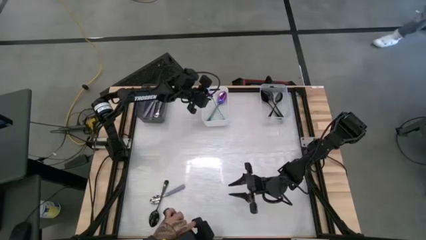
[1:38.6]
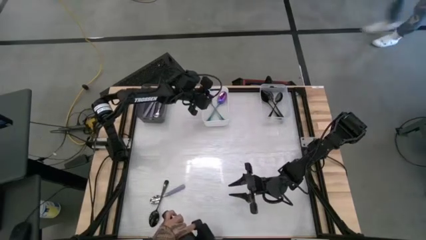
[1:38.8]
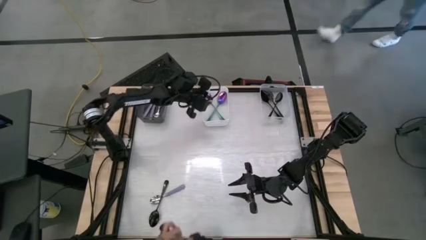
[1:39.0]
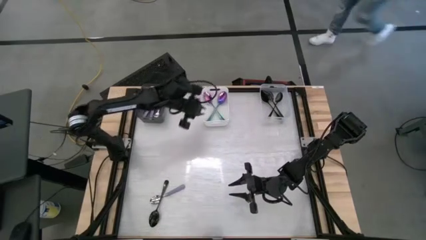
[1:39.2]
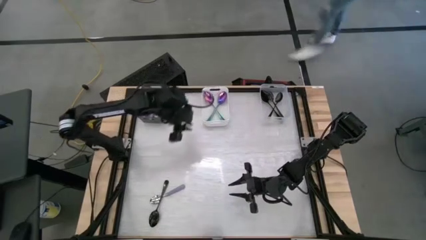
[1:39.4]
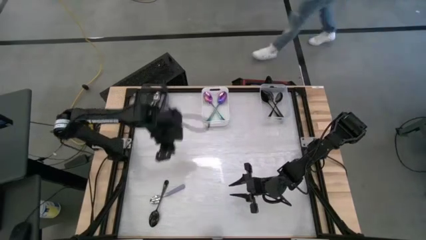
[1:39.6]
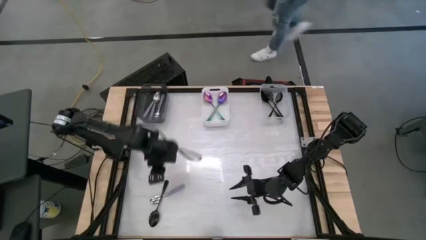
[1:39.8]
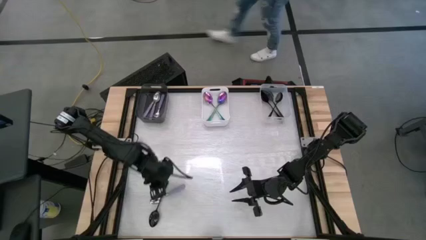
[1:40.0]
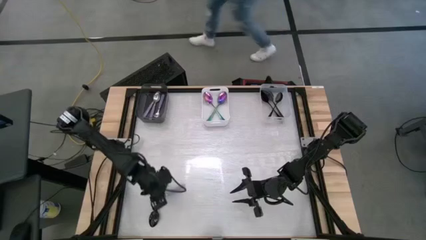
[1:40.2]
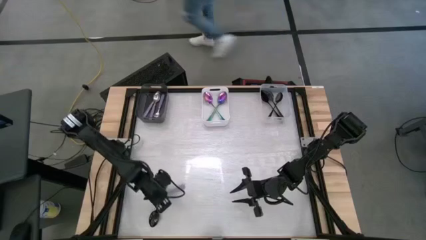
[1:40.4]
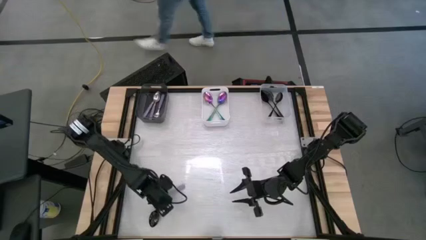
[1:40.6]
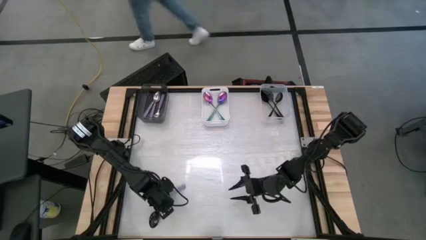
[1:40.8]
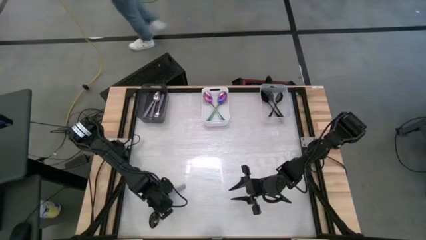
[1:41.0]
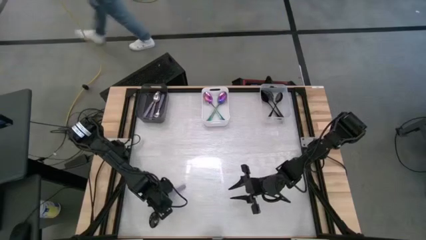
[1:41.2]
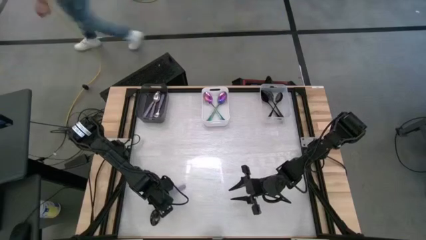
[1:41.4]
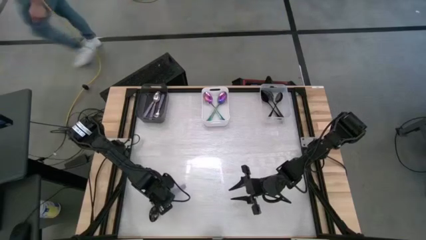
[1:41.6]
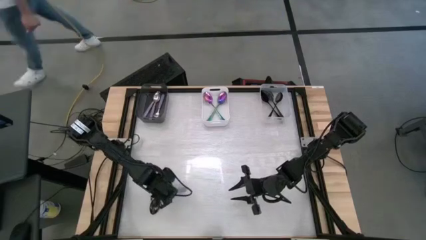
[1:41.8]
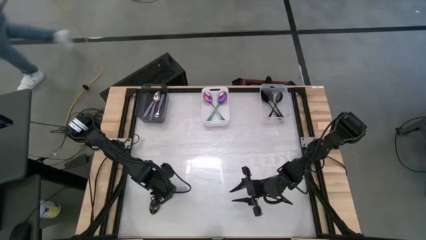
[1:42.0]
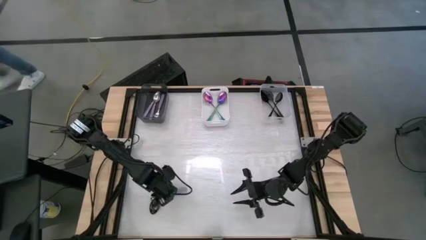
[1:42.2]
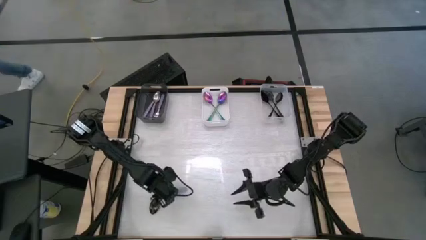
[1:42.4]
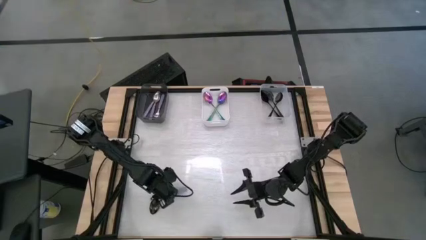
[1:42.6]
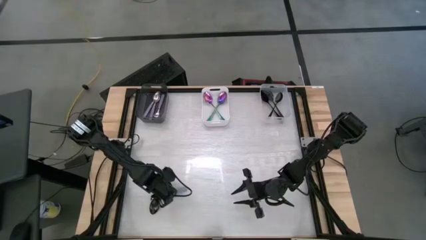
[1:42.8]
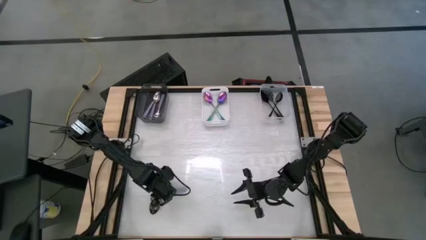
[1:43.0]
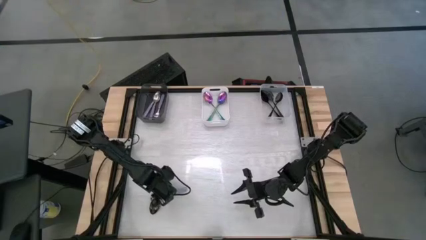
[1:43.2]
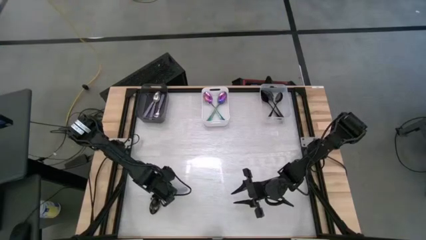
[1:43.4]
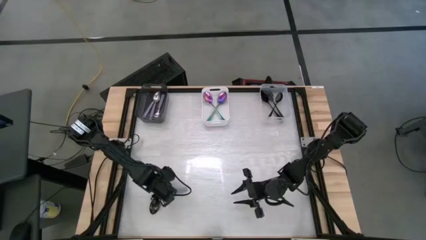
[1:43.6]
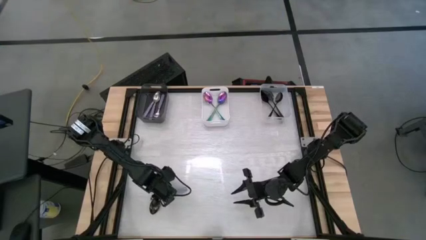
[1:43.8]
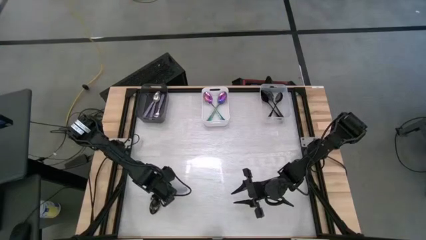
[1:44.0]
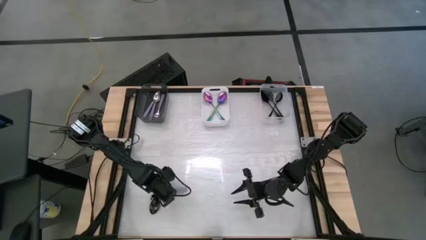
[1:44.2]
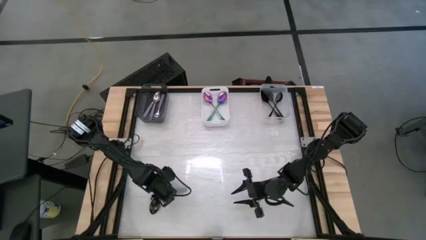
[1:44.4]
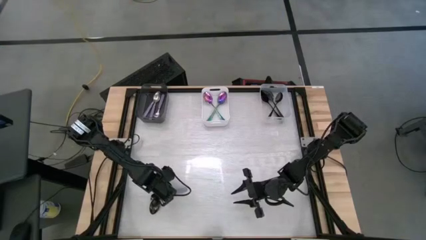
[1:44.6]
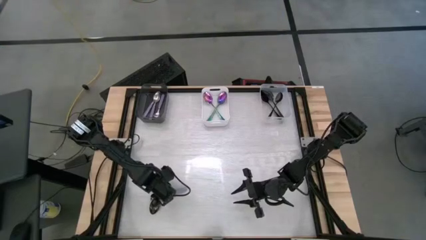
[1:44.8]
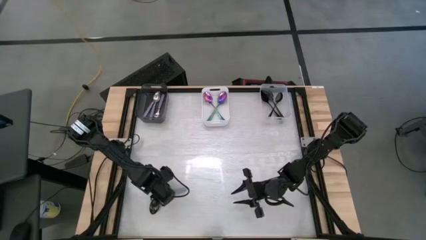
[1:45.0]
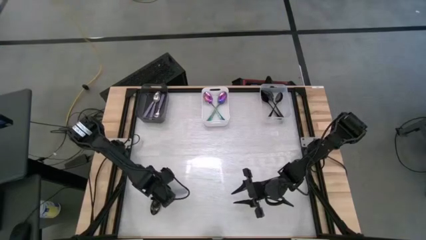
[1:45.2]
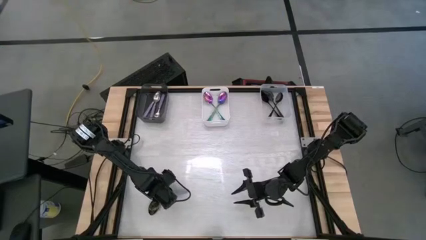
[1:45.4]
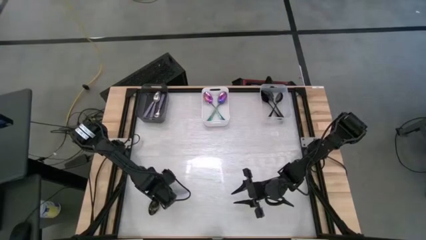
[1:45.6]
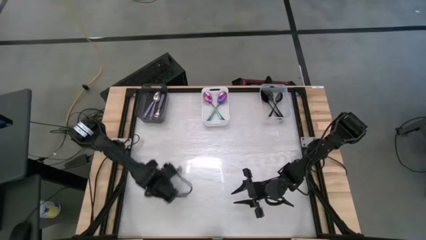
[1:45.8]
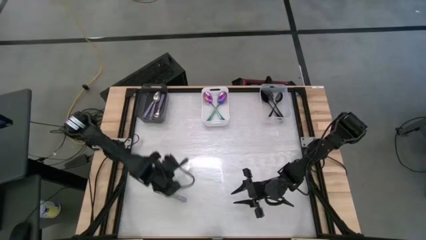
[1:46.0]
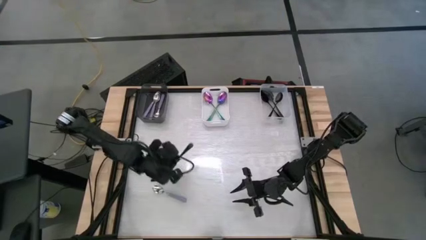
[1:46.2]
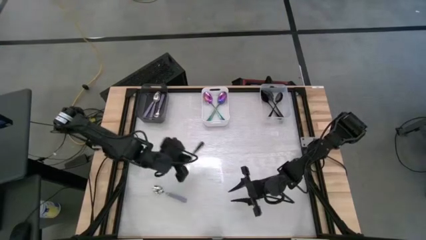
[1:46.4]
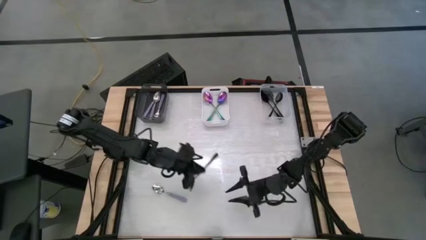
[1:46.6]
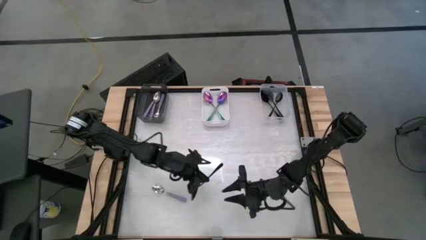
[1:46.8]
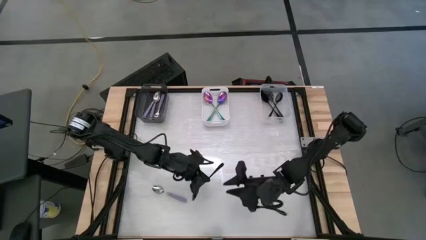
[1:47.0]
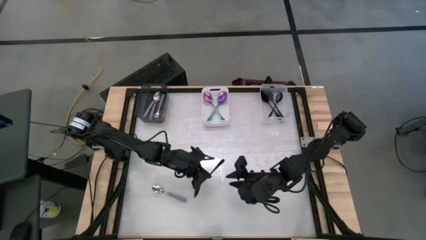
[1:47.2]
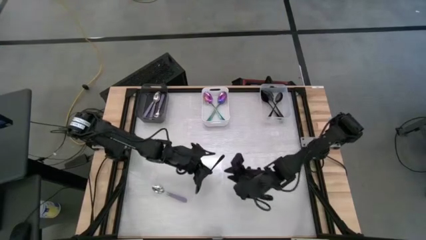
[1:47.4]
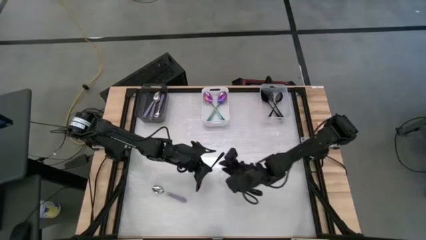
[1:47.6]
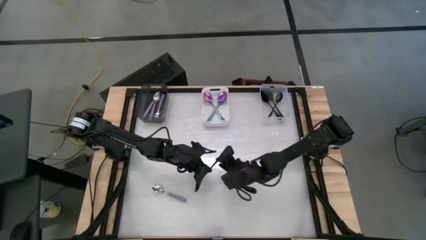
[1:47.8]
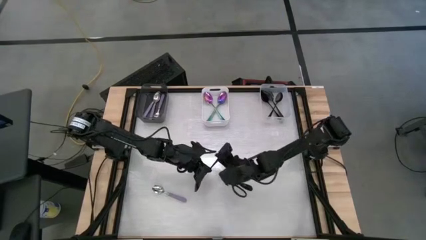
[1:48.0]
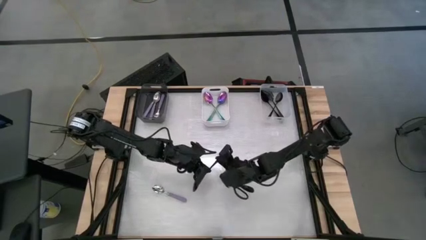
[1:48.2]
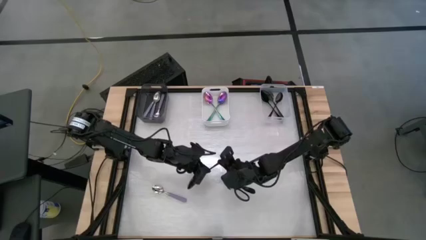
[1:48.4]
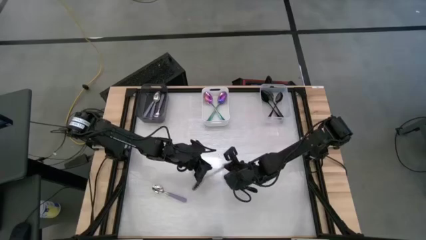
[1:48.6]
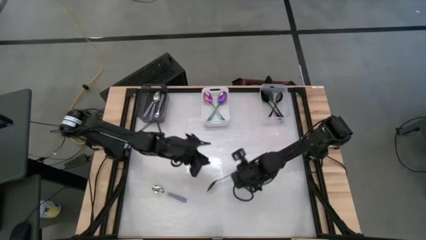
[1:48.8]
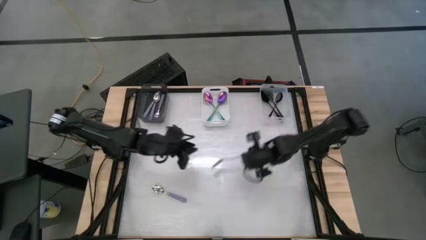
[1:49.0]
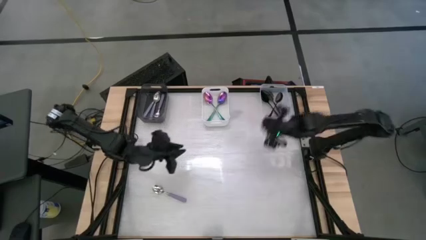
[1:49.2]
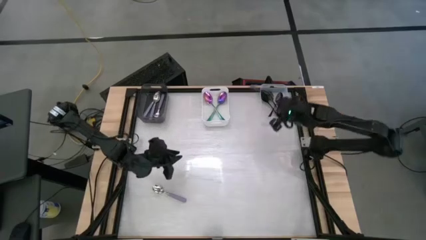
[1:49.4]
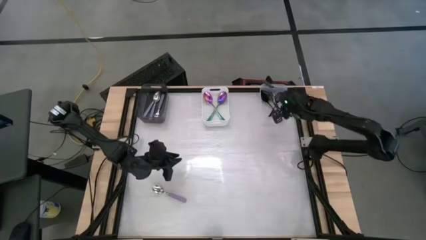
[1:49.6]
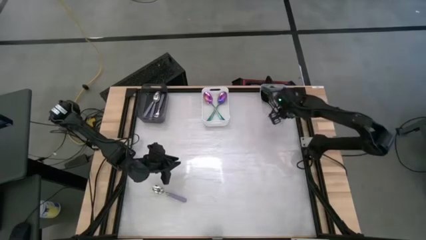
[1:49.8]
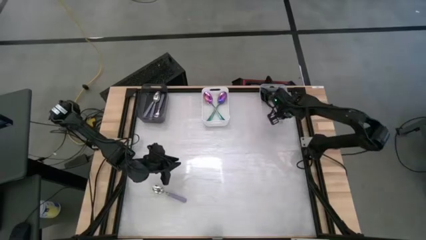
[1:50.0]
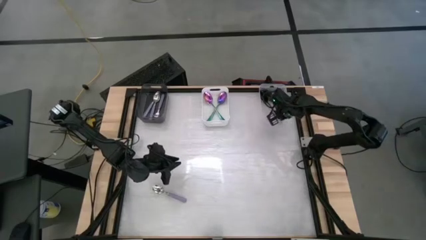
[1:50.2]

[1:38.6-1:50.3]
Task: Sort silverware by color (type)
Put the black spoon into the transparent bin

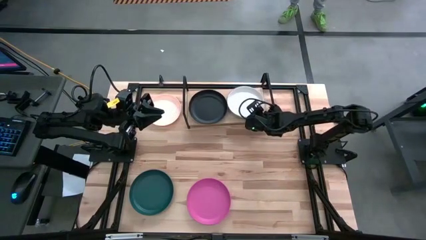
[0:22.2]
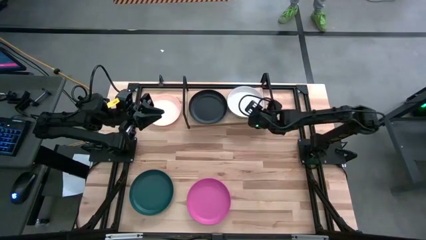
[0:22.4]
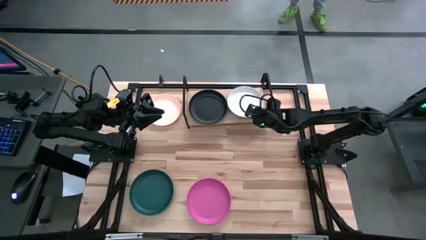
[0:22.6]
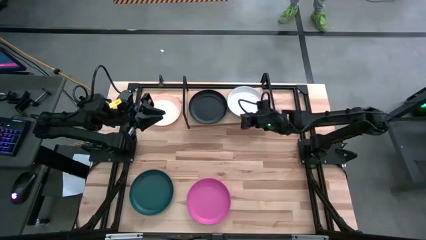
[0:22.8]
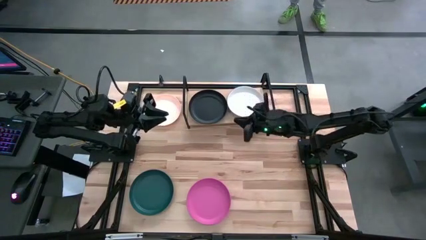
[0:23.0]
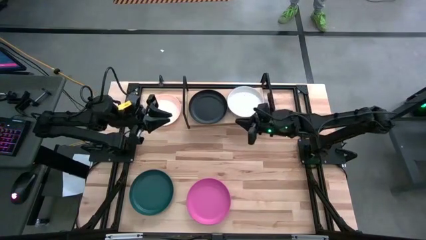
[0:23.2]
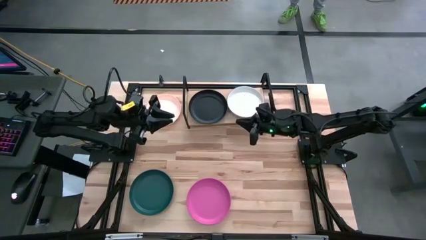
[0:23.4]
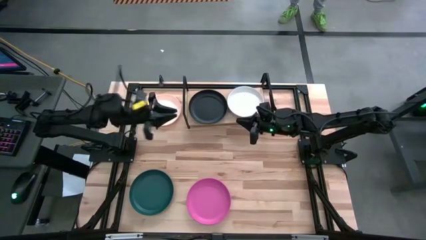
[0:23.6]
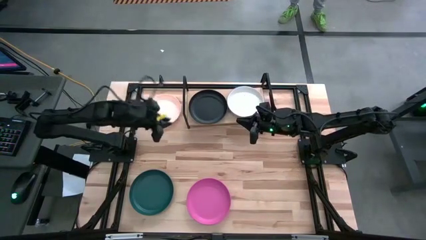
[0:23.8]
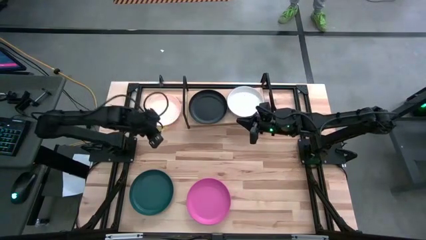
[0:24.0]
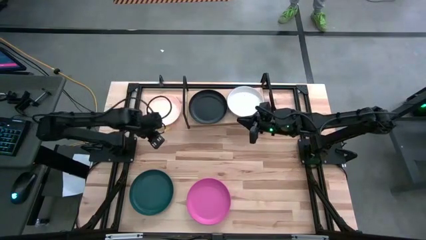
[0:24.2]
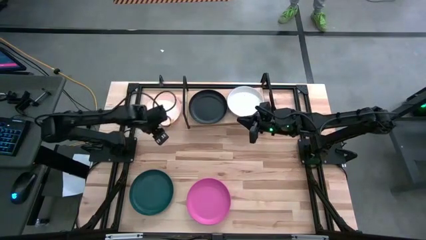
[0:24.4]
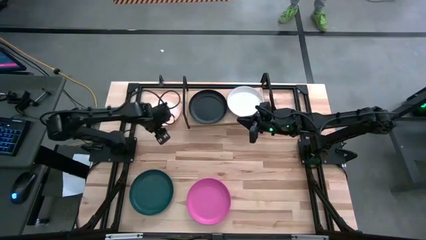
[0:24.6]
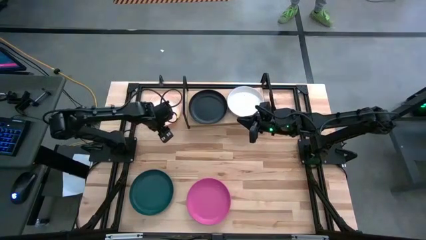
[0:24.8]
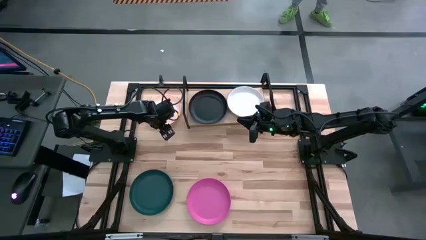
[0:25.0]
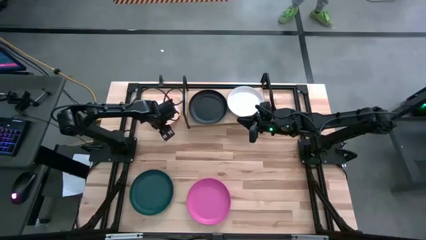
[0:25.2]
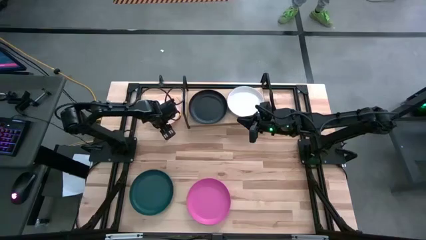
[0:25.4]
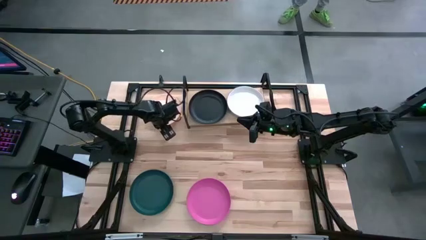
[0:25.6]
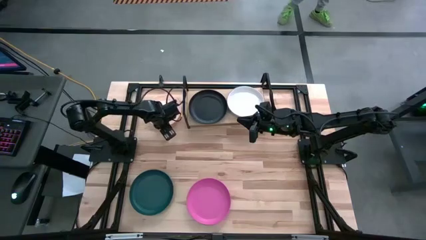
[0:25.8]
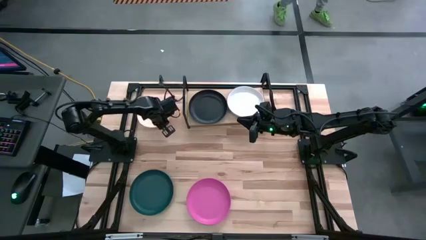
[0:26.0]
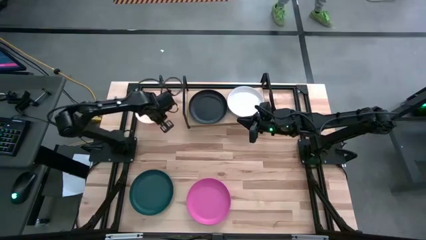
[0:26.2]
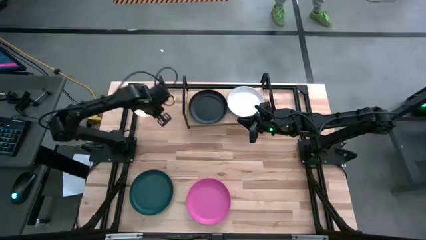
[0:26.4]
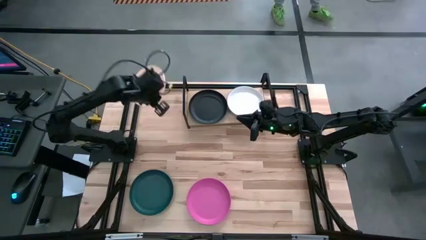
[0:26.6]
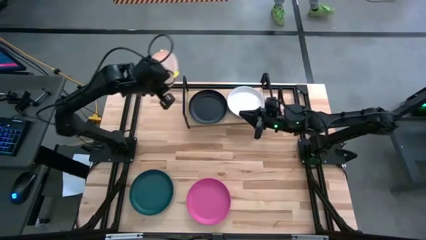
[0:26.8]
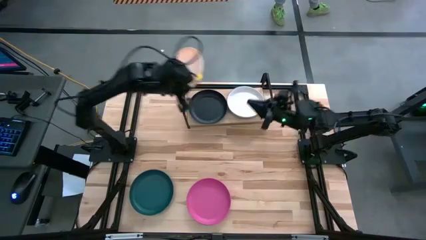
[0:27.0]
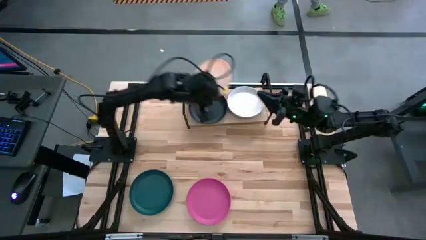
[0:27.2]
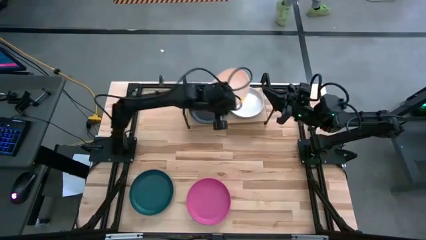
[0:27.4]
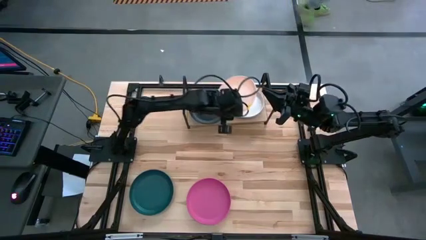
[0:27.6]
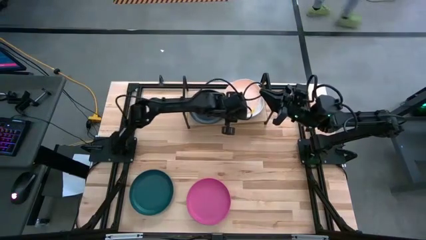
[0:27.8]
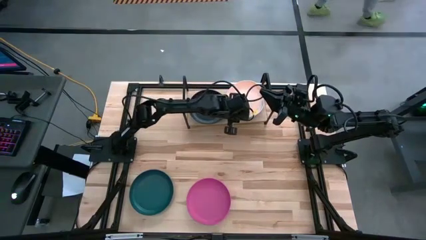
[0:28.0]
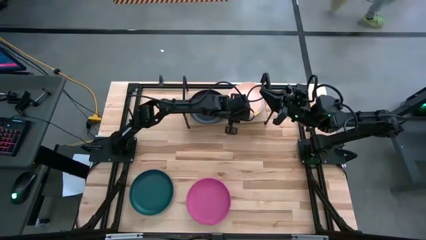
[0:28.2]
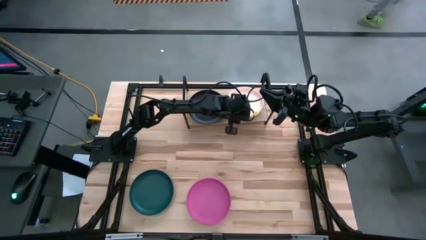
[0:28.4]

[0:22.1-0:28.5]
Task: Place and stack plates onto a shelf
Stack the peach plate on top of the white plate on the shelf

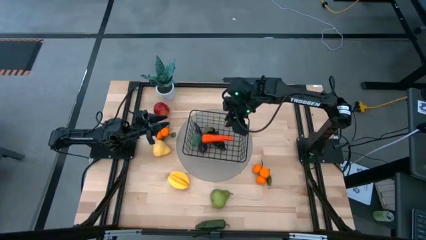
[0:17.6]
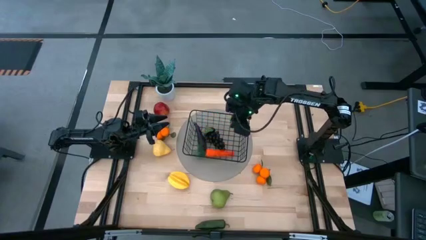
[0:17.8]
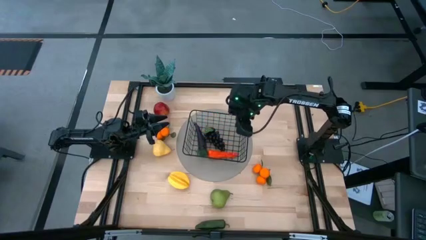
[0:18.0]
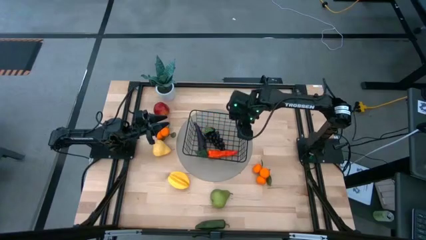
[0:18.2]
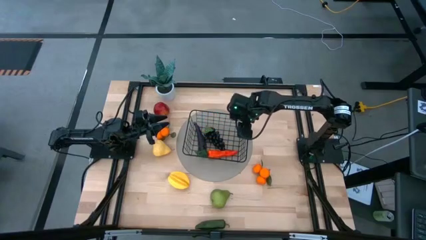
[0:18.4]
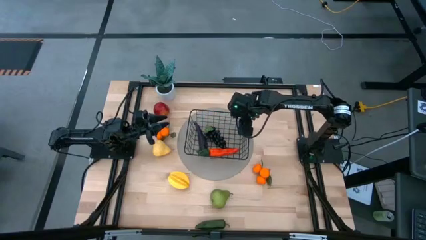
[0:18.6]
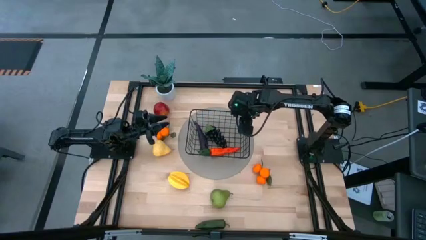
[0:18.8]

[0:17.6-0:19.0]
Task: Build produce basket
Adjust the black wire basket
